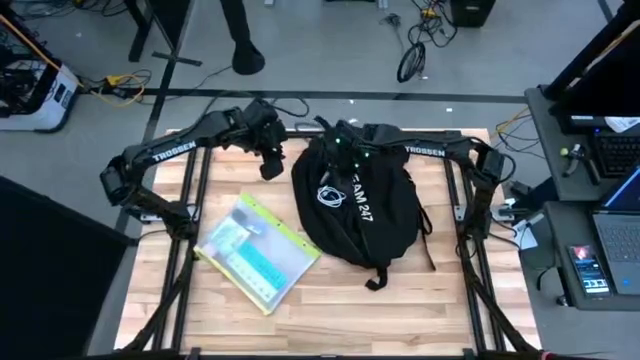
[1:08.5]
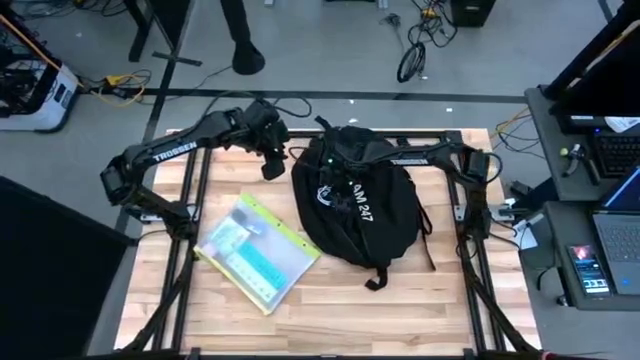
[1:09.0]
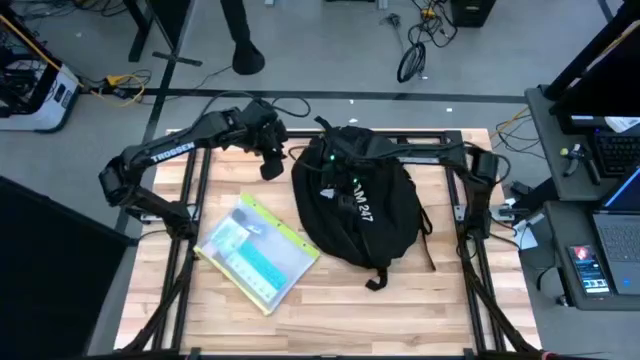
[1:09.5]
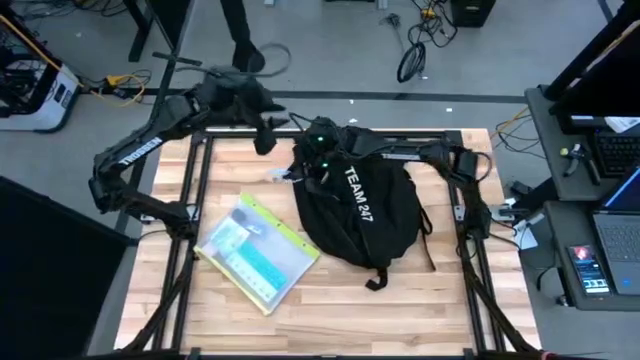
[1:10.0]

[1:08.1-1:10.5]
Task: Unpack backpack
Remove the white cable charger from the black backpack

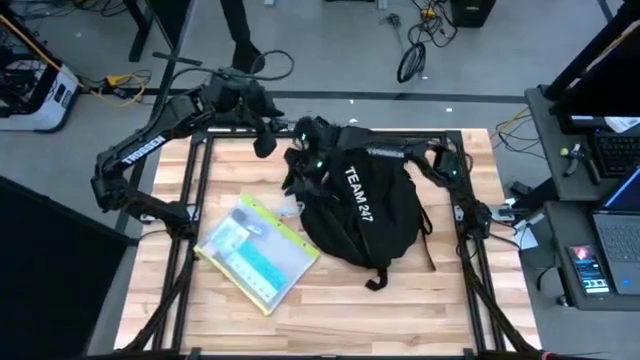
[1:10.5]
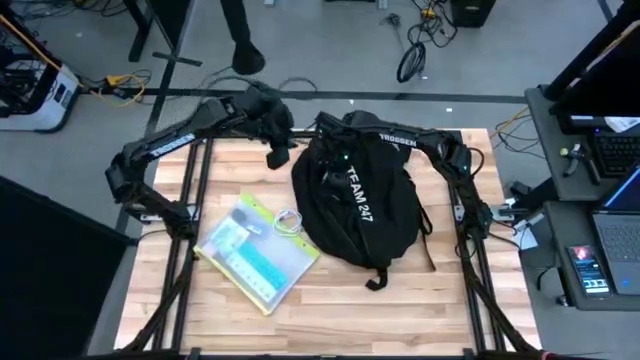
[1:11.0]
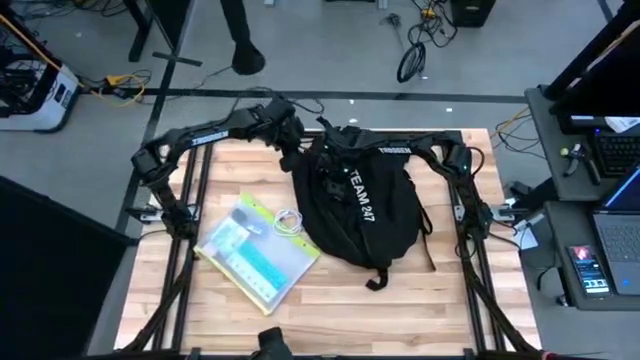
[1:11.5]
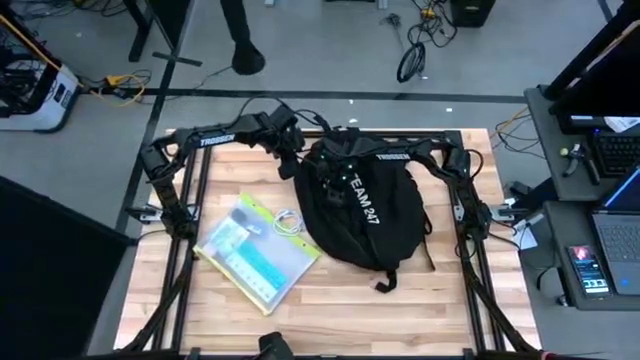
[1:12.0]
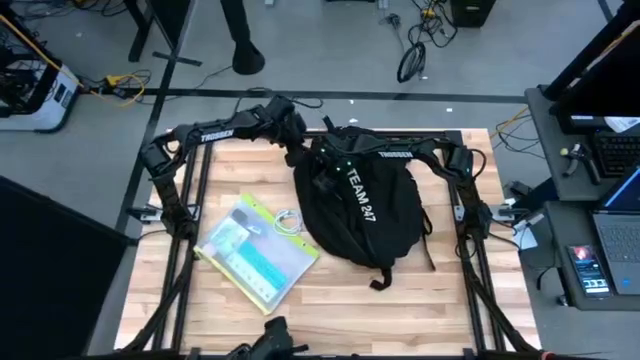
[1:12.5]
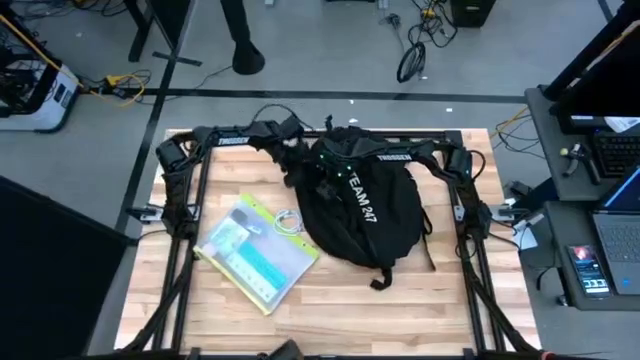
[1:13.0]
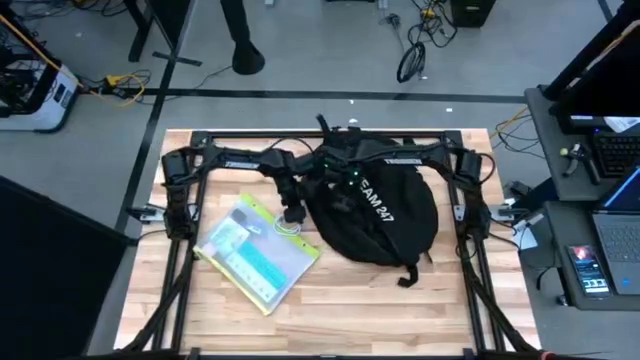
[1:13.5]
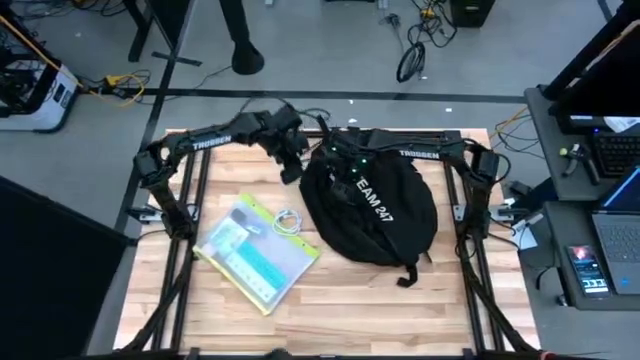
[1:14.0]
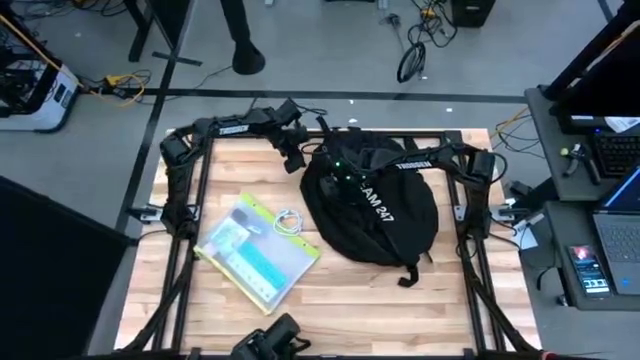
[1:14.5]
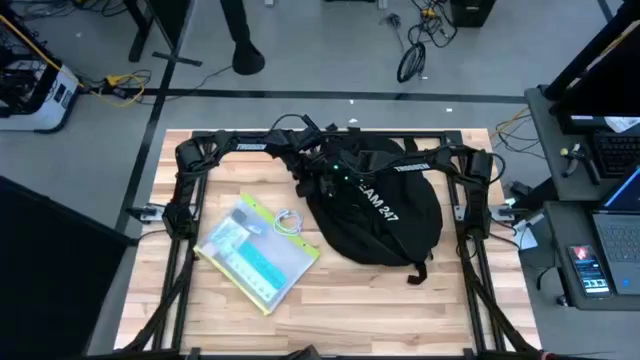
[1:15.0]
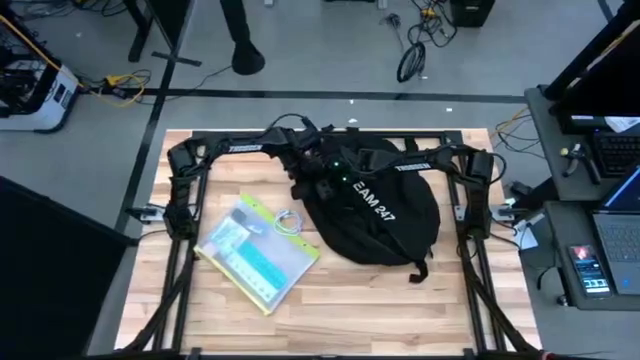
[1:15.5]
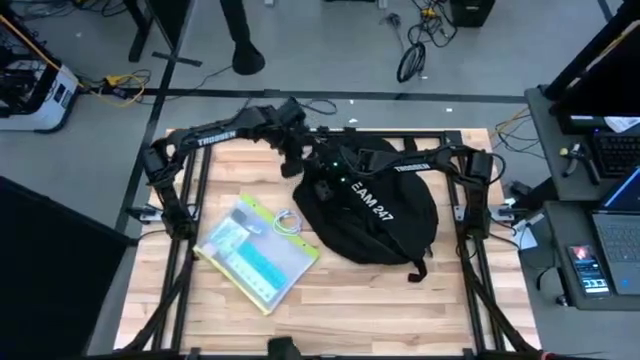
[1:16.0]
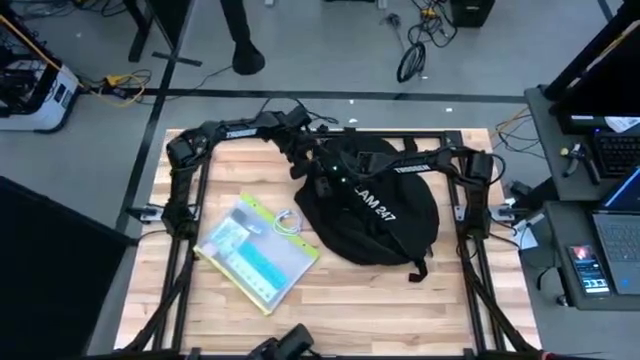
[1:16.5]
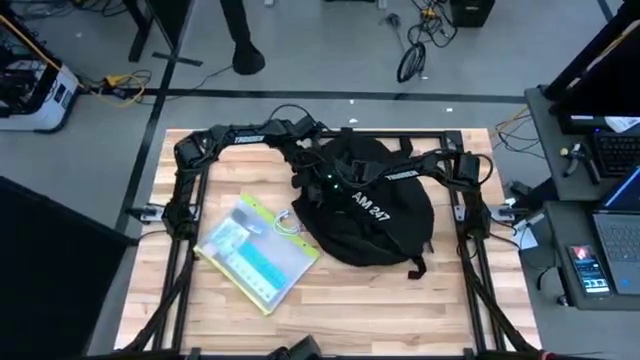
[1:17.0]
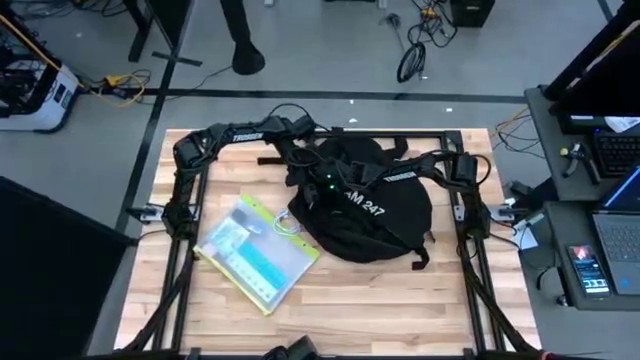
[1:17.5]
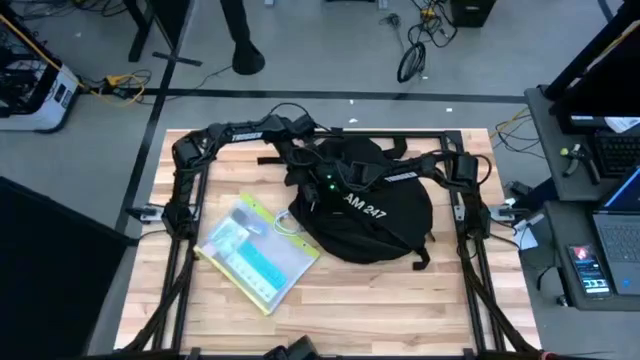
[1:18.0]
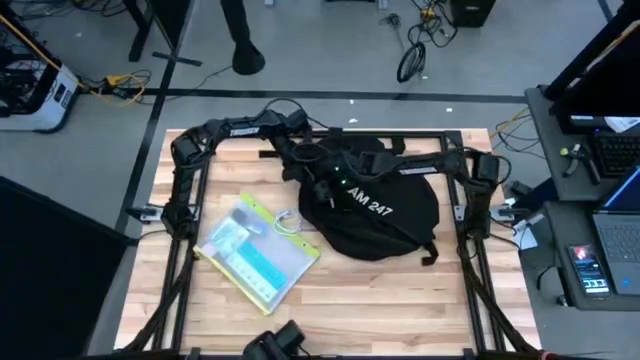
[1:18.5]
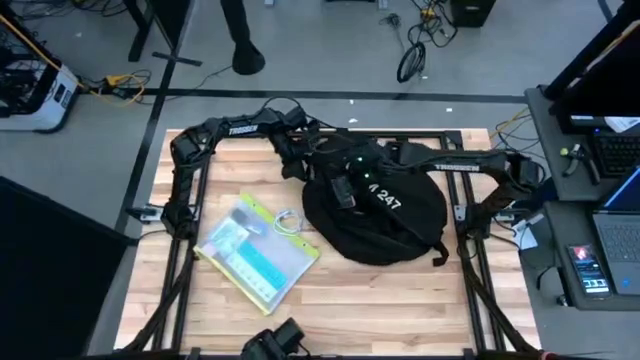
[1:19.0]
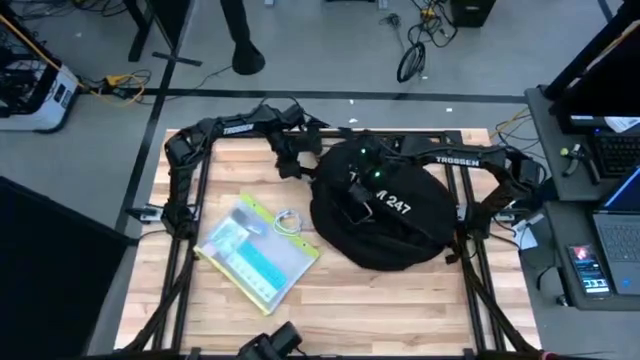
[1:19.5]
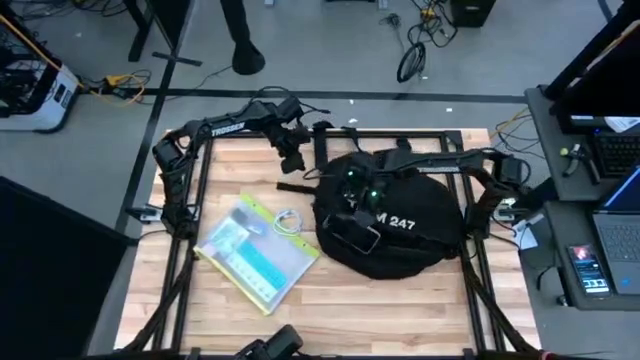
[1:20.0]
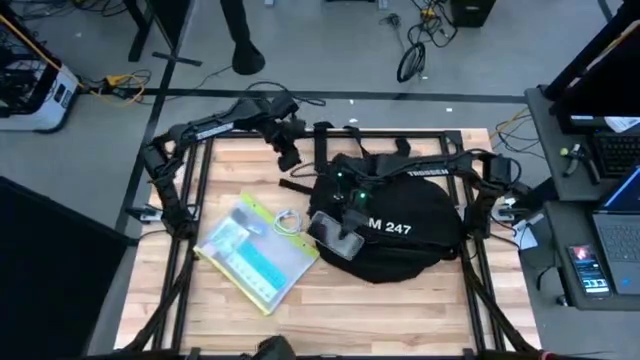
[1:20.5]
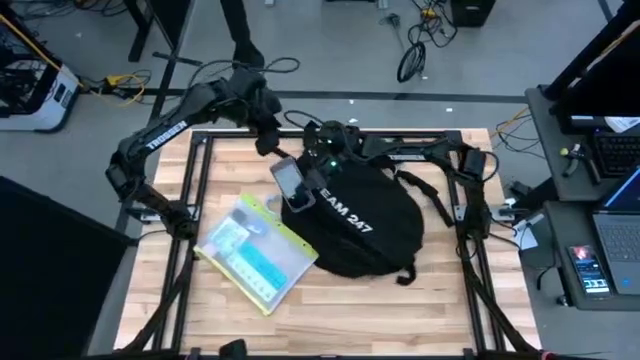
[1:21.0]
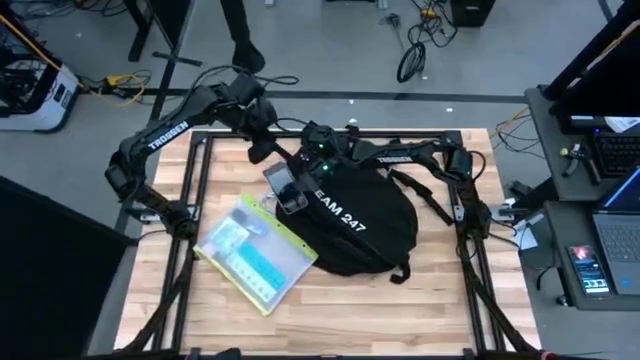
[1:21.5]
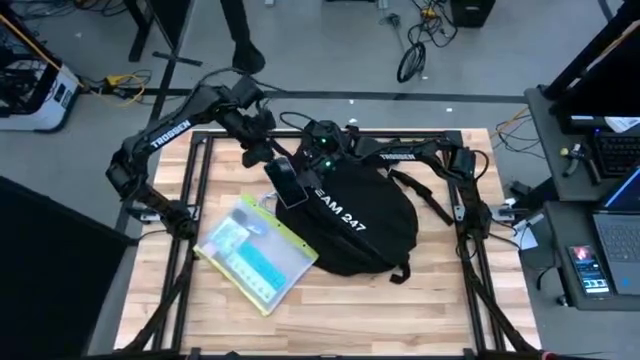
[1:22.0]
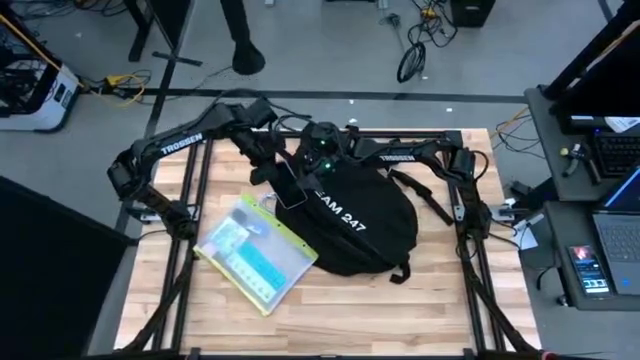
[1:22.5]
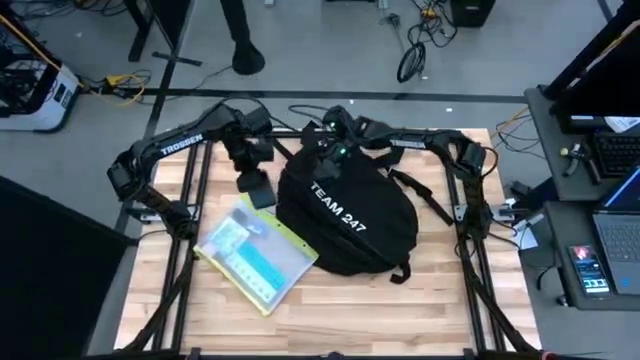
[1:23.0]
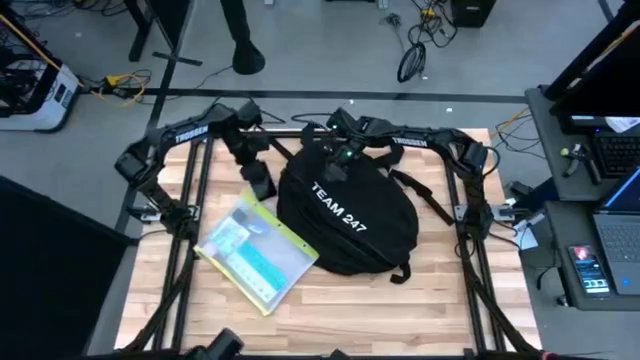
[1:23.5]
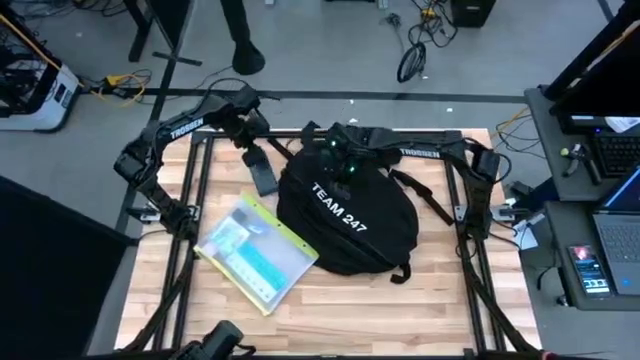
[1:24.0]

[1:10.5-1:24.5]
Remove the cellphone from the black backpack

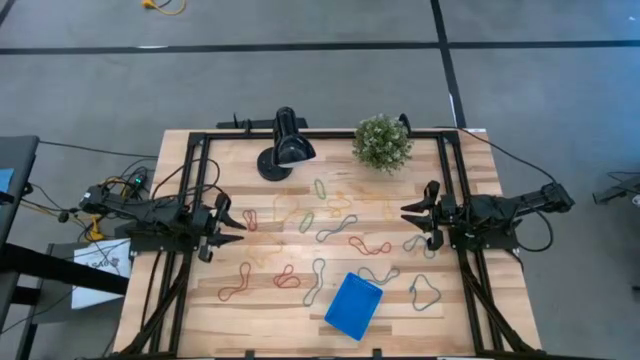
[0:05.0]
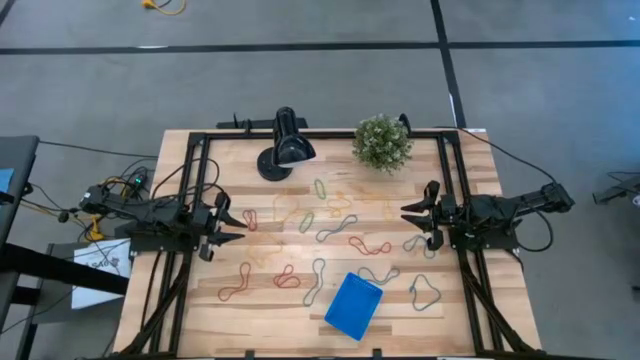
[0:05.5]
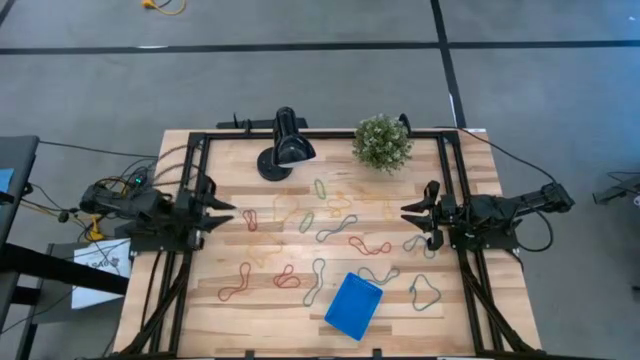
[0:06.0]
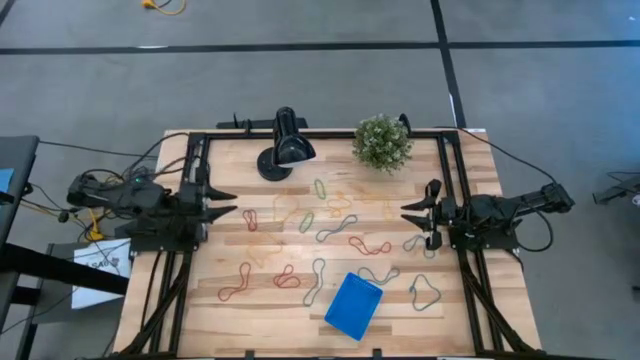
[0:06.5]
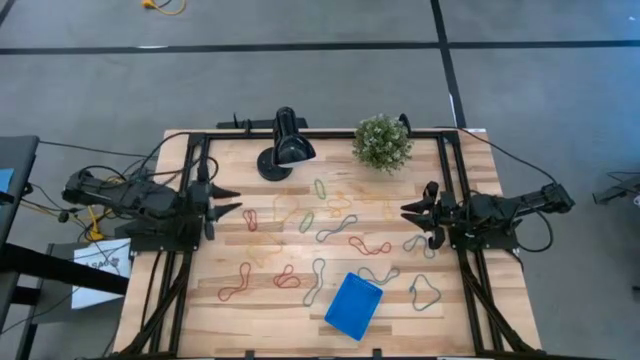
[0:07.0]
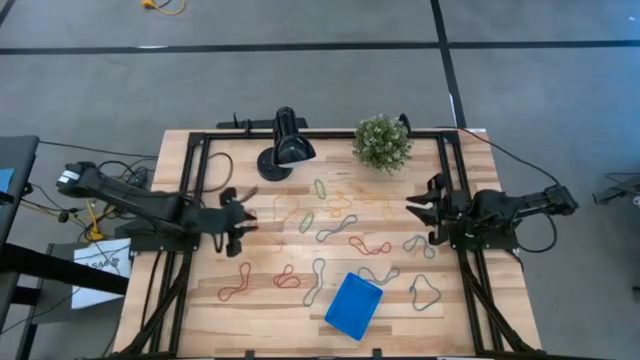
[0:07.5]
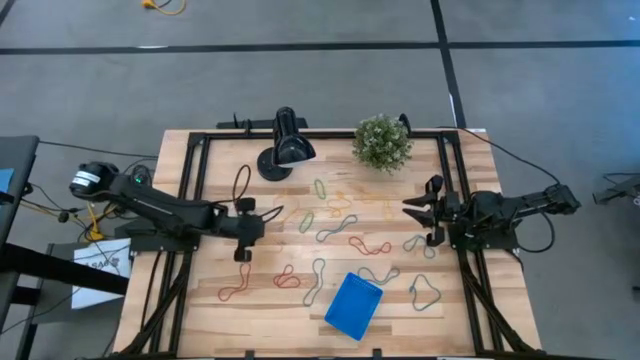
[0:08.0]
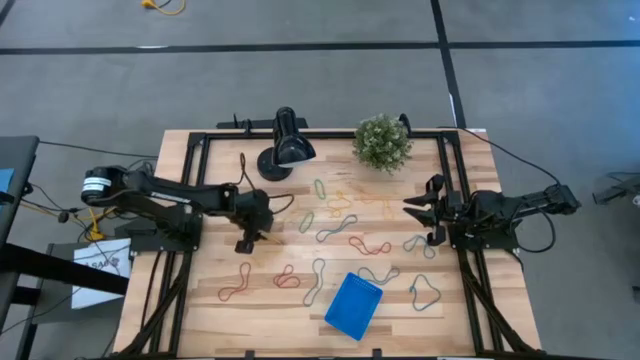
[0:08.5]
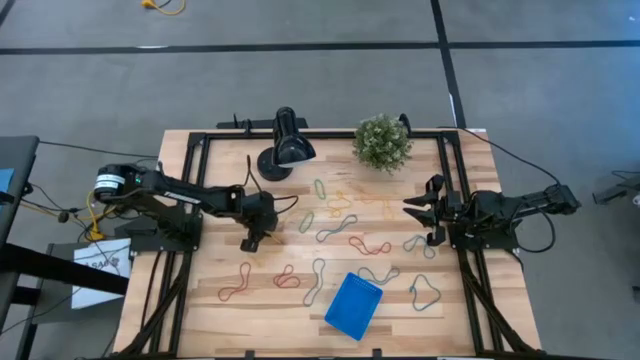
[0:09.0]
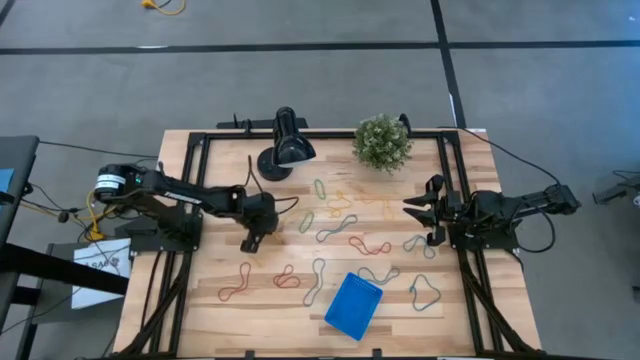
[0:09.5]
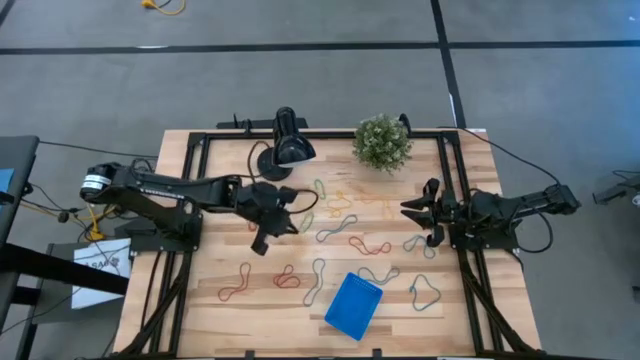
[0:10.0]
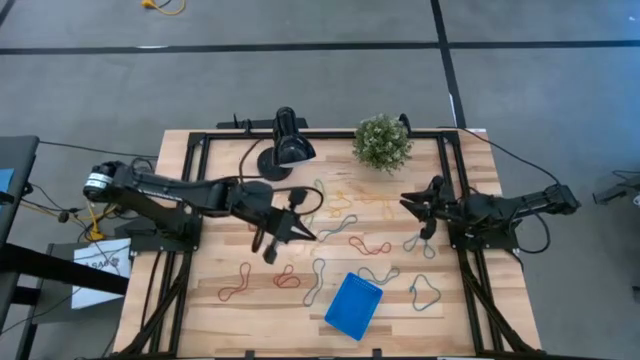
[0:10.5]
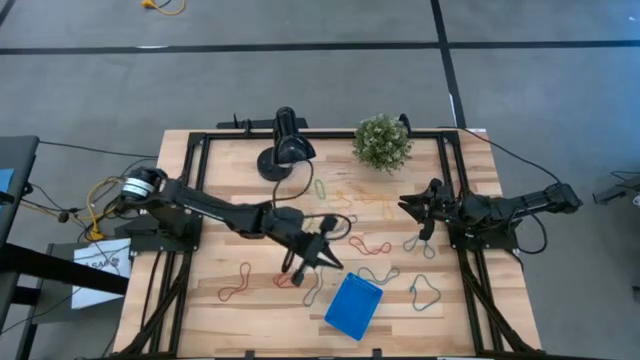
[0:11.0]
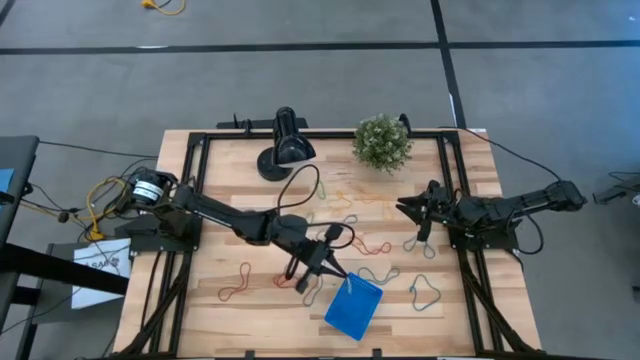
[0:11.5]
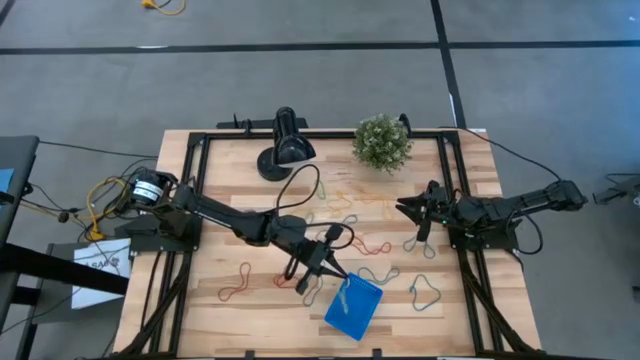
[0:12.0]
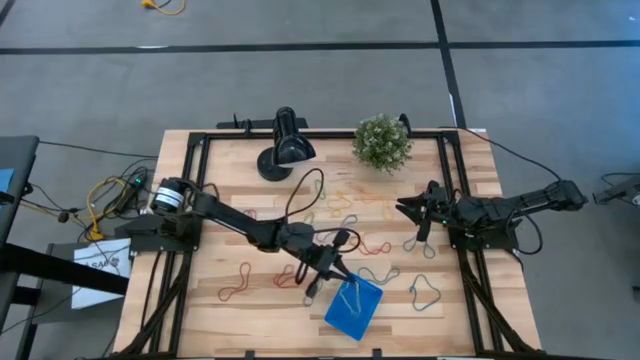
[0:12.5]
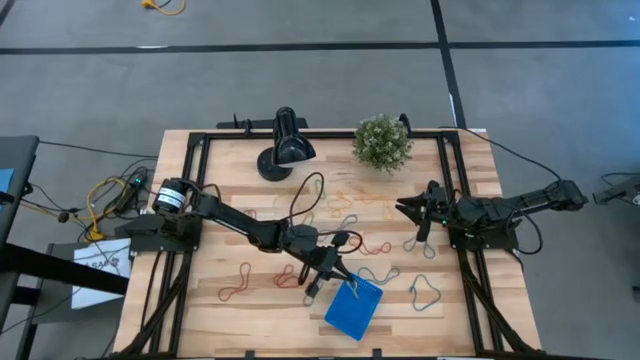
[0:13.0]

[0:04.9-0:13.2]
Task: Pick and place items into bin
Put the yellow rubber band into the blue bin
